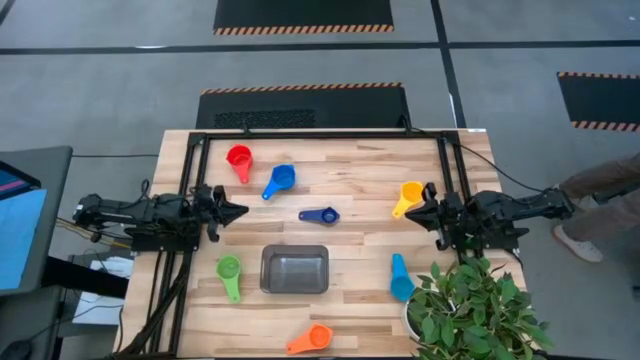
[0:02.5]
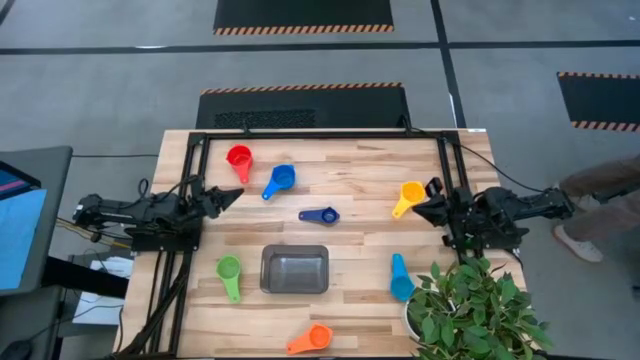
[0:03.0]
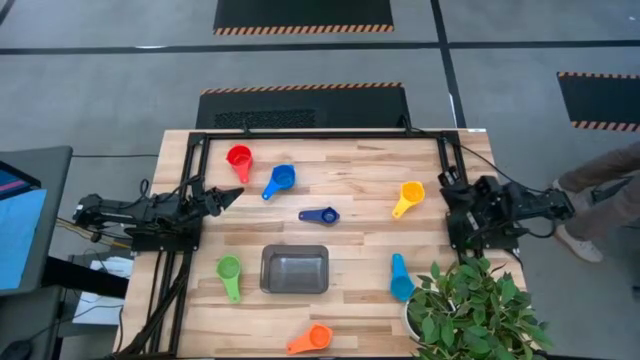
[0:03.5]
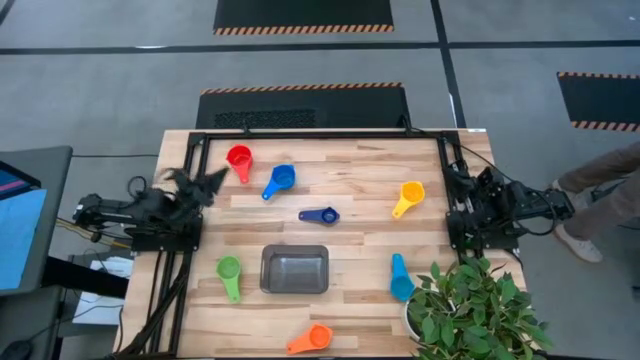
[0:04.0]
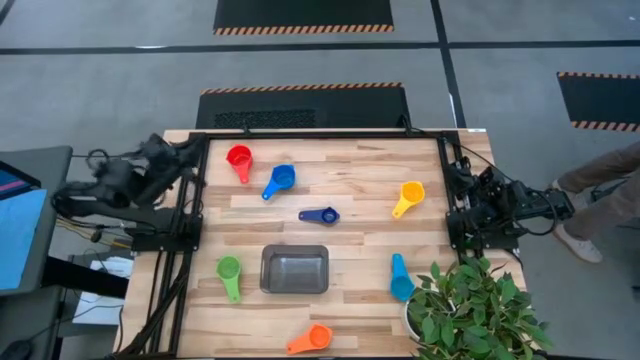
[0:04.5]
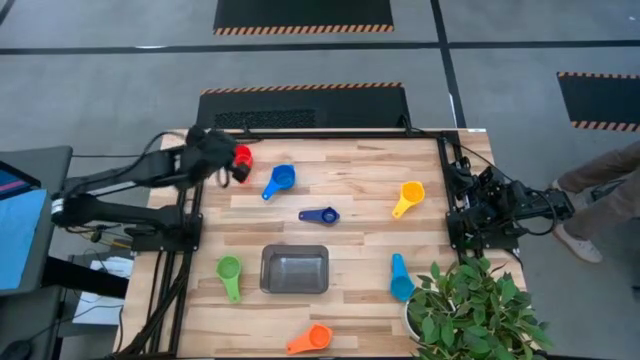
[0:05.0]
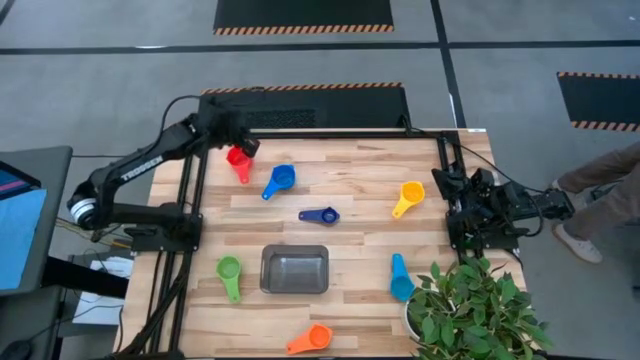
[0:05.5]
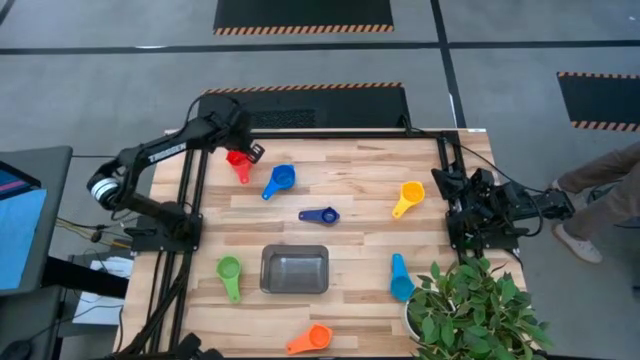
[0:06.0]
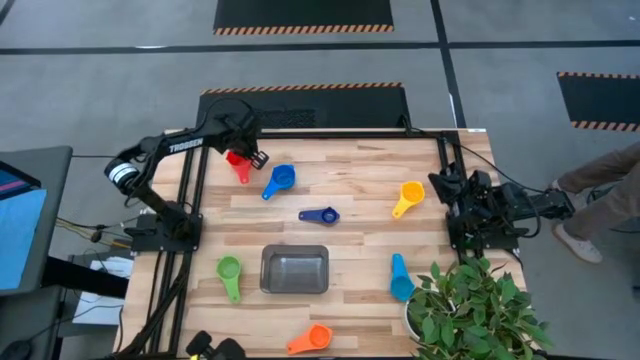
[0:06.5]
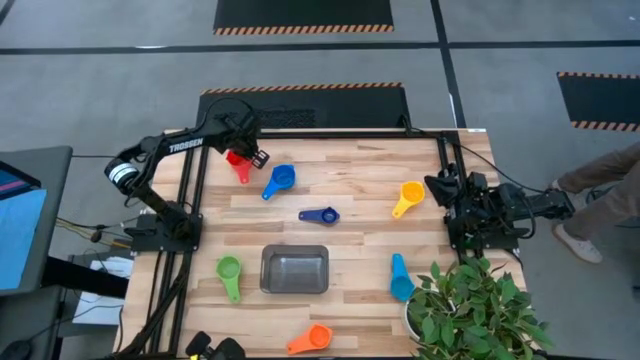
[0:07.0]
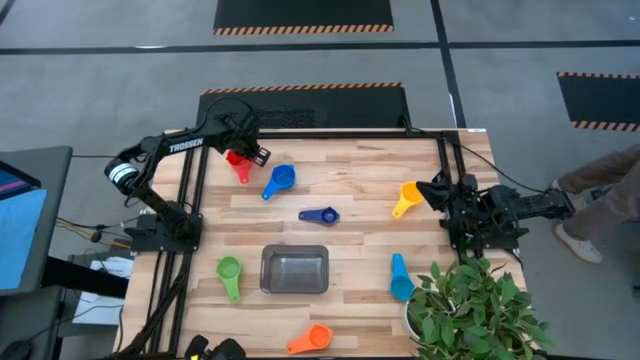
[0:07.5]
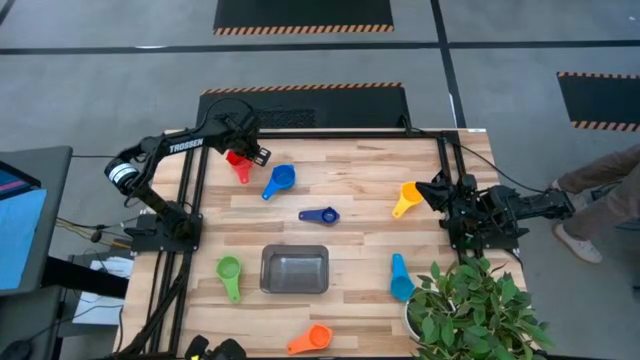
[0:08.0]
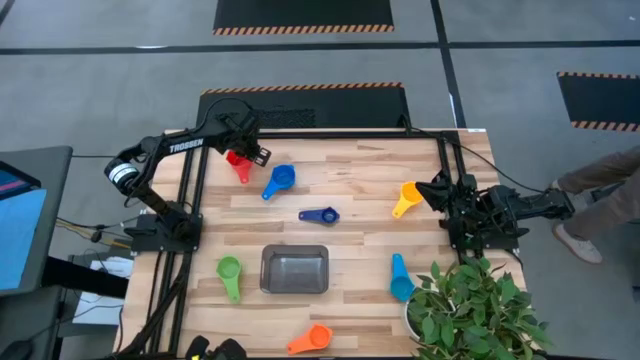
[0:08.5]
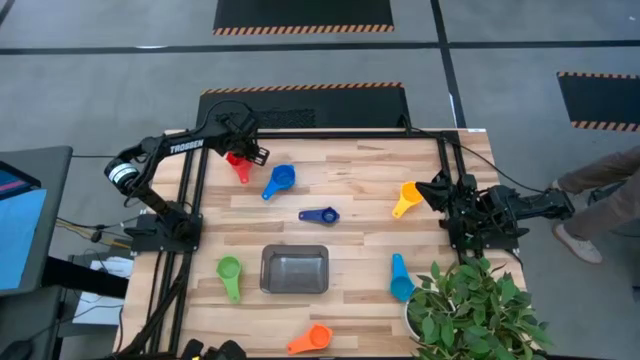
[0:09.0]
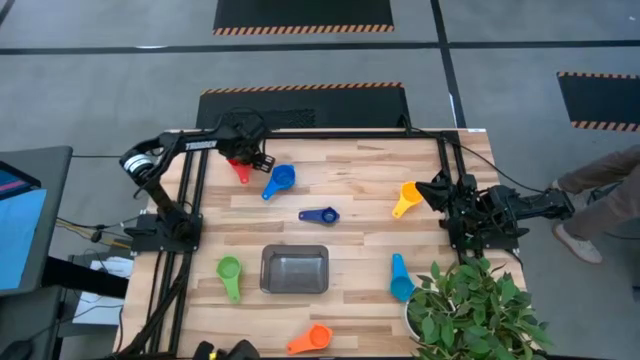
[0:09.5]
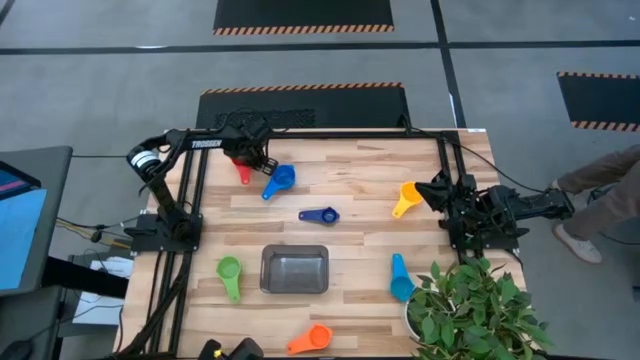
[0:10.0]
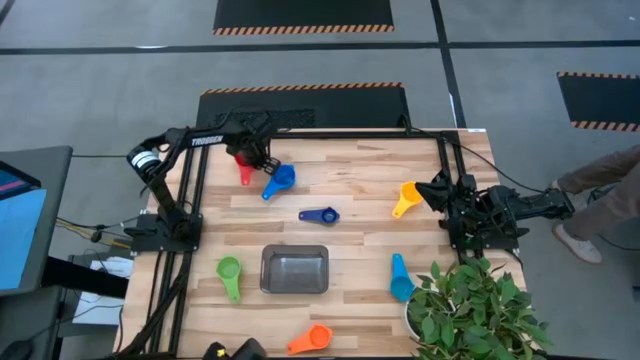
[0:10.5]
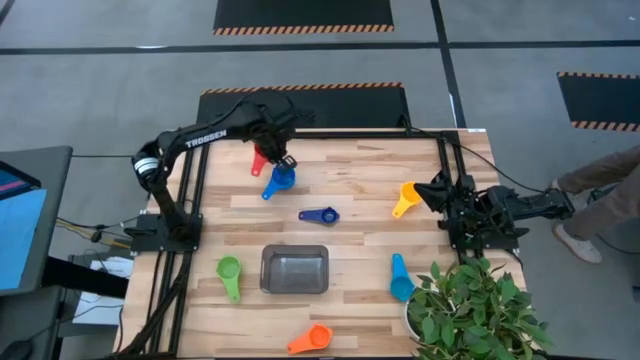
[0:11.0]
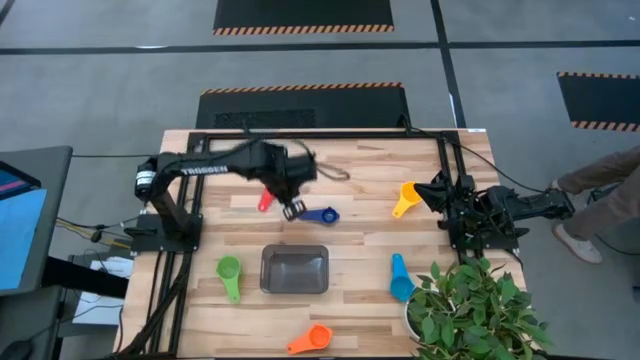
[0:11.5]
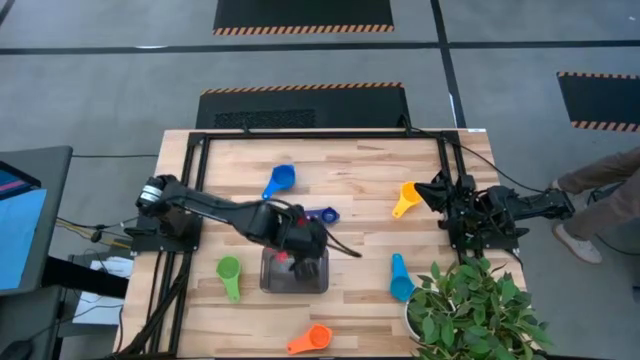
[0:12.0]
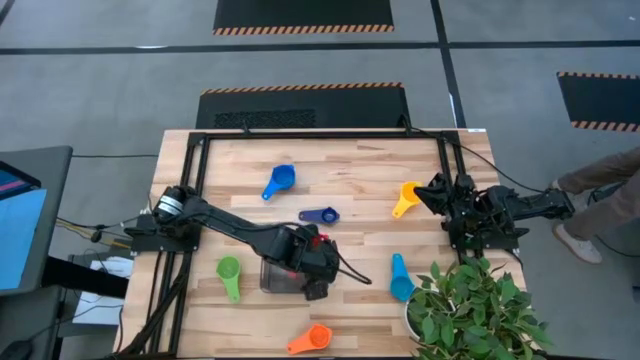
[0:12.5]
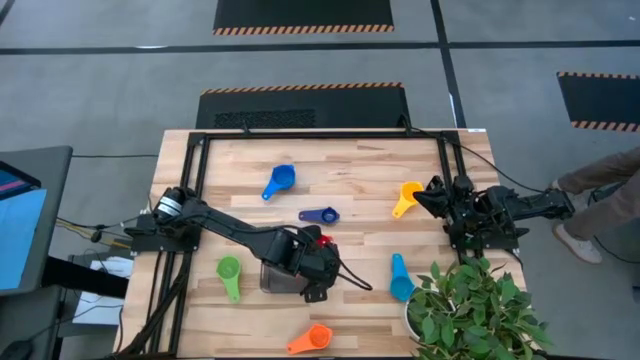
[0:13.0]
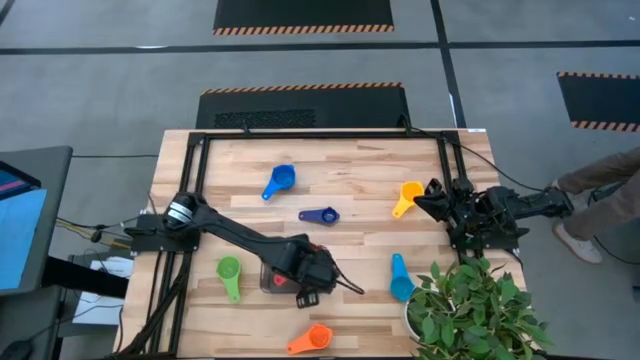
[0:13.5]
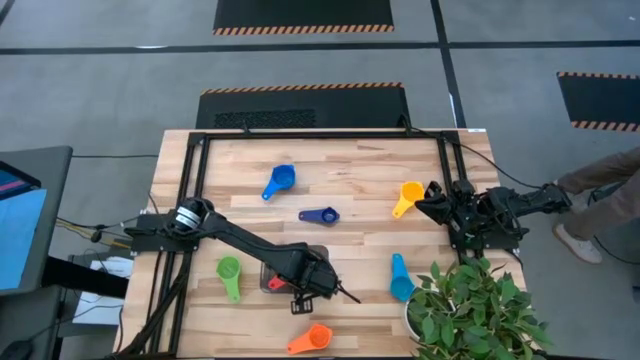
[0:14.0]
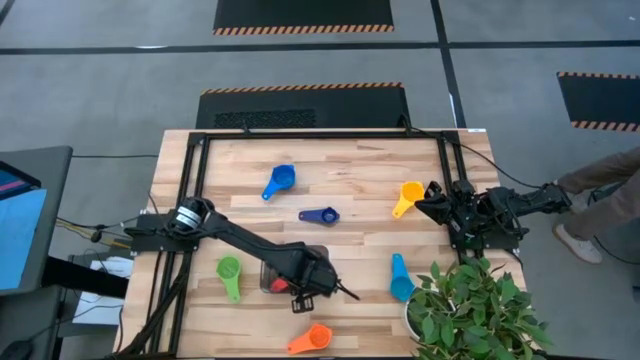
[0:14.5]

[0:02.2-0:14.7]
Task: Nest measuring cups in basket
Put the red measuring cup into the bin

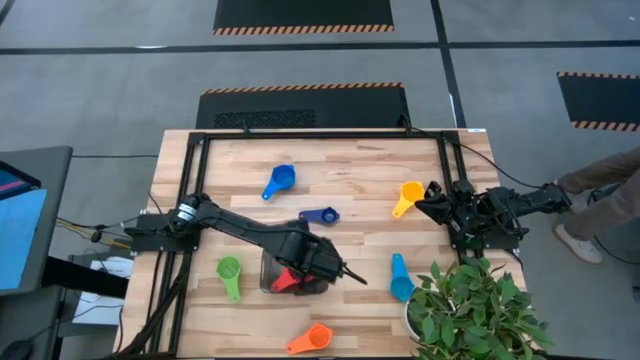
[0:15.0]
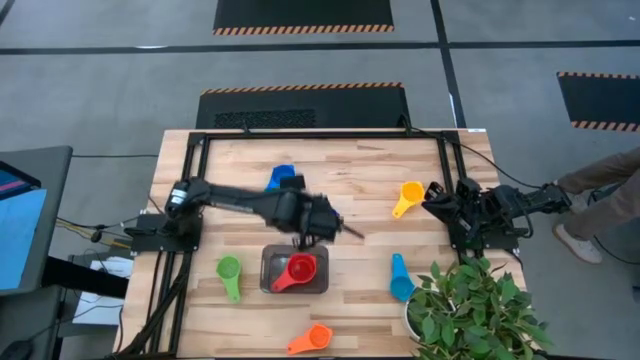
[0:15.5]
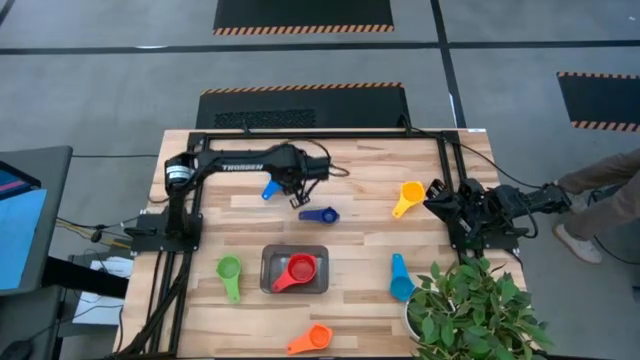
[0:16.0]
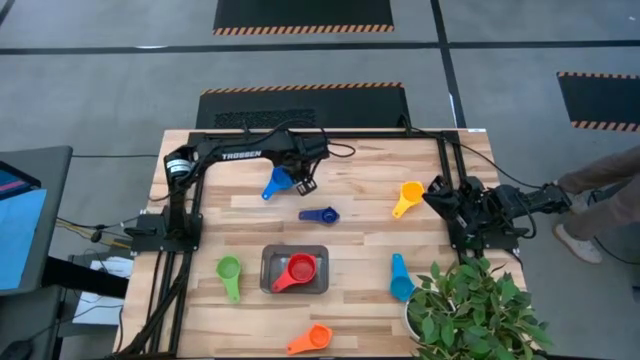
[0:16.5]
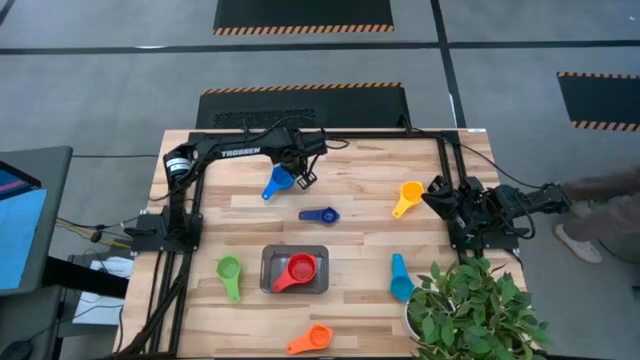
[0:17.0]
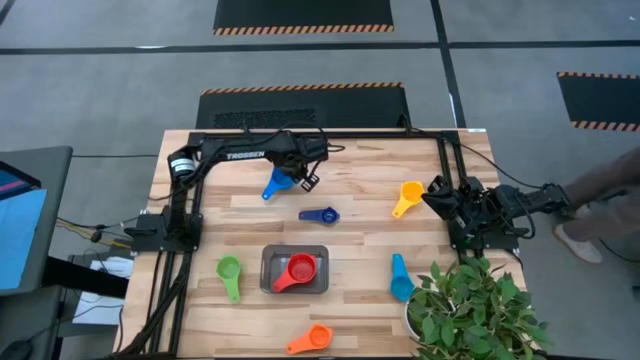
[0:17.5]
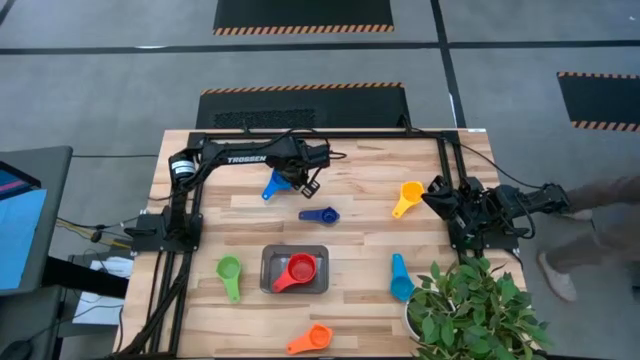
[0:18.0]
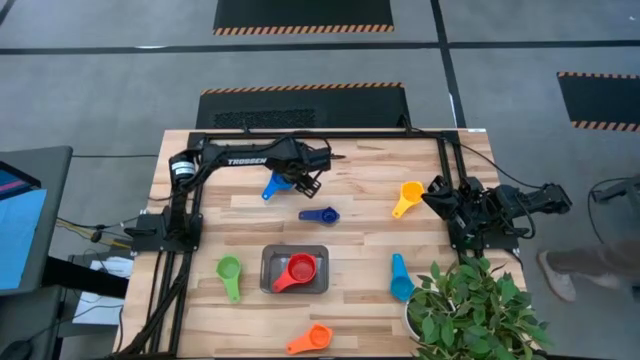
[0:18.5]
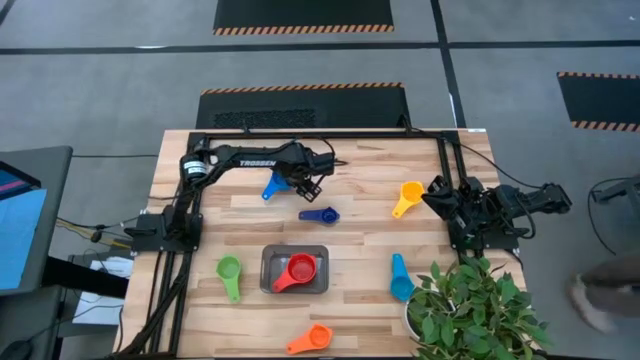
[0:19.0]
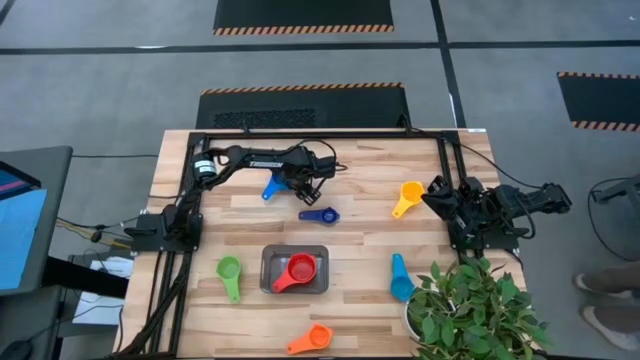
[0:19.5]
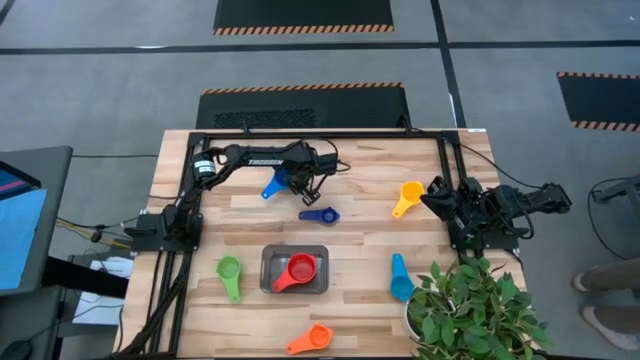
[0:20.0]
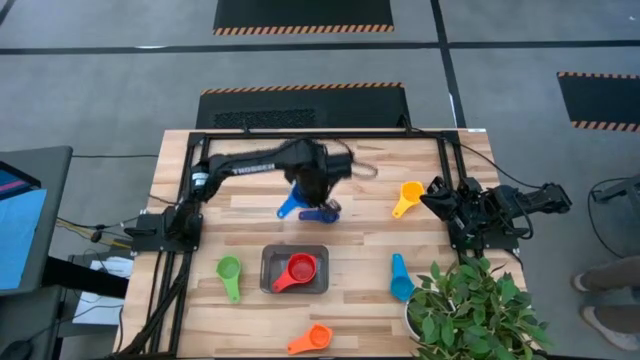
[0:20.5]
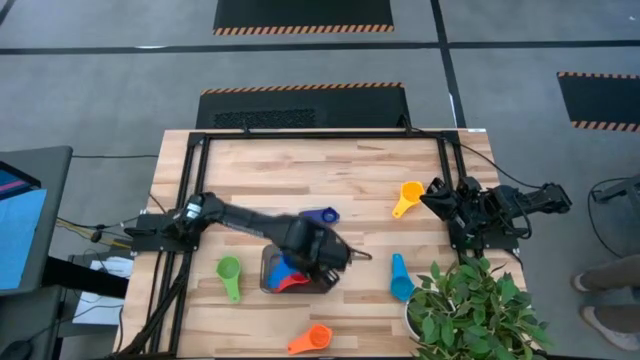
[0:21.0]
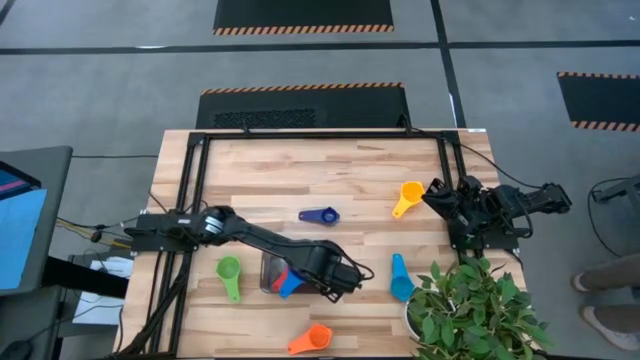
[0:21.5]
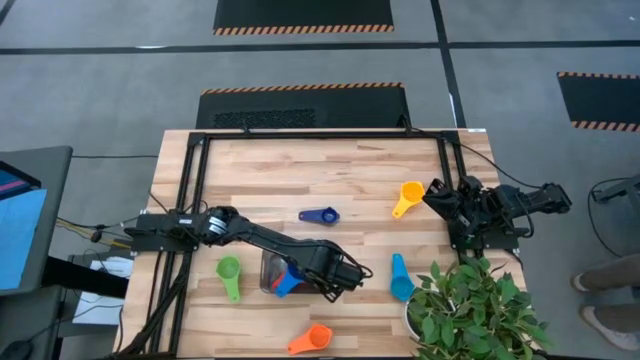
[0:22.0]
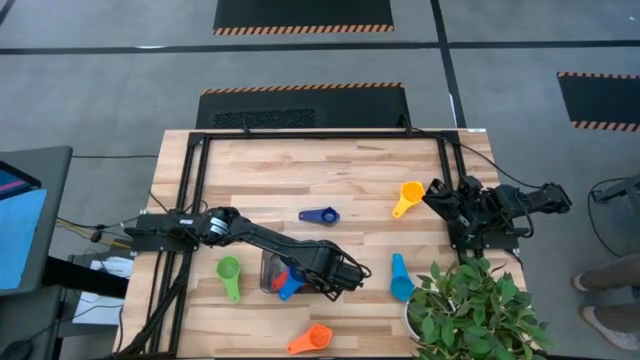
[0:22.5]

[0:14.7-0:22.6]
Stack the blue measuring cup on top of the red measuring cup in the bin
